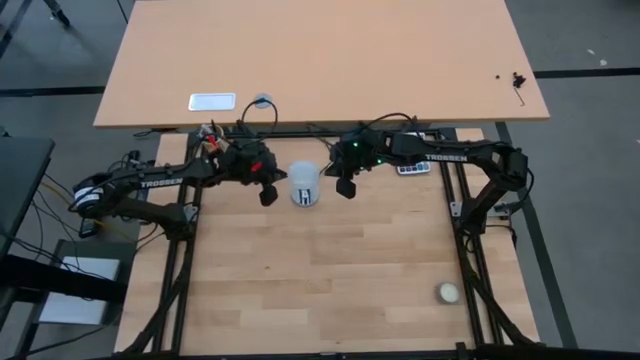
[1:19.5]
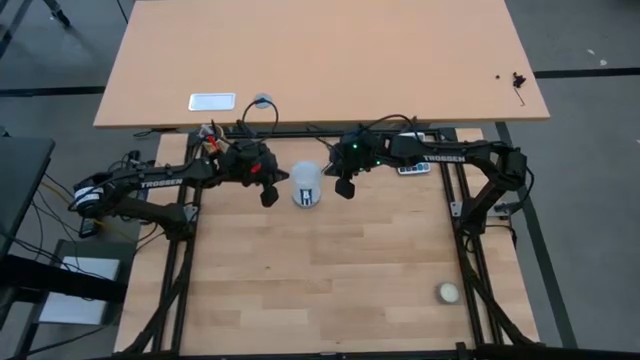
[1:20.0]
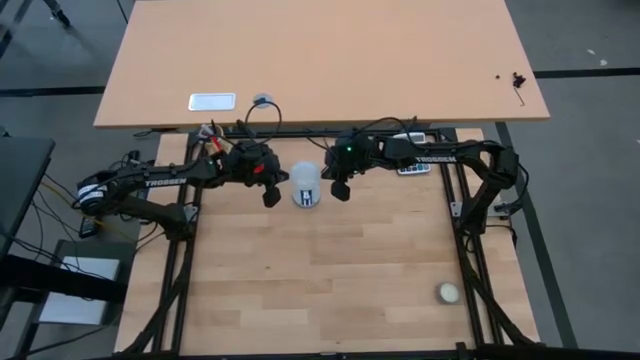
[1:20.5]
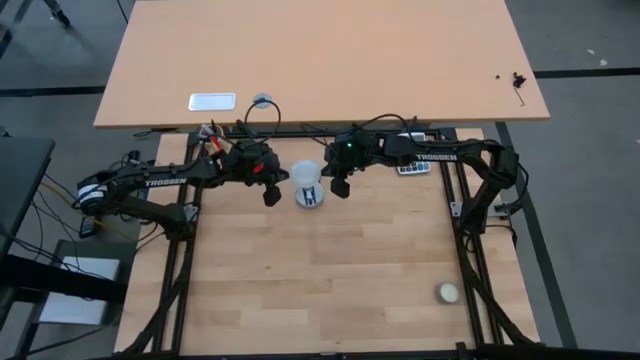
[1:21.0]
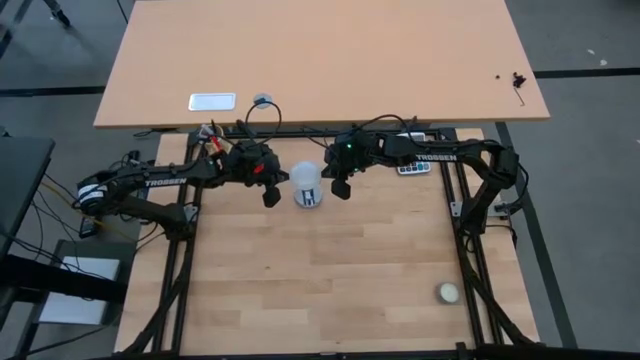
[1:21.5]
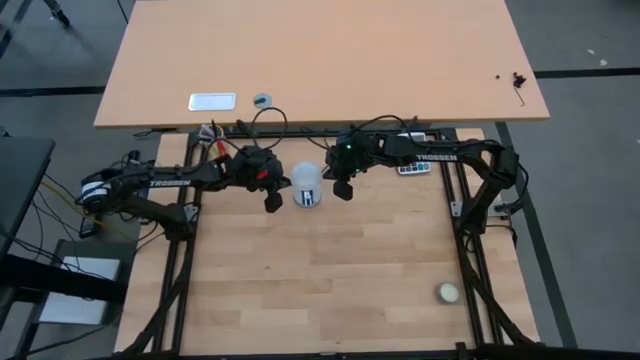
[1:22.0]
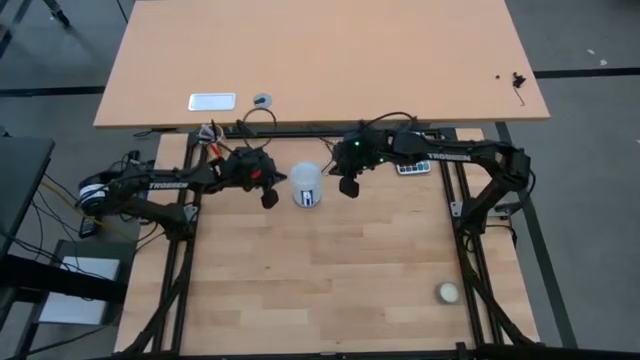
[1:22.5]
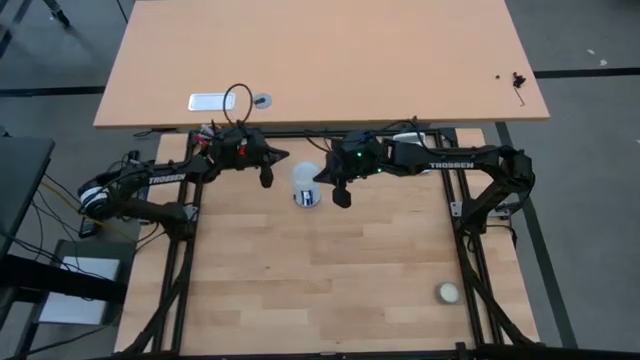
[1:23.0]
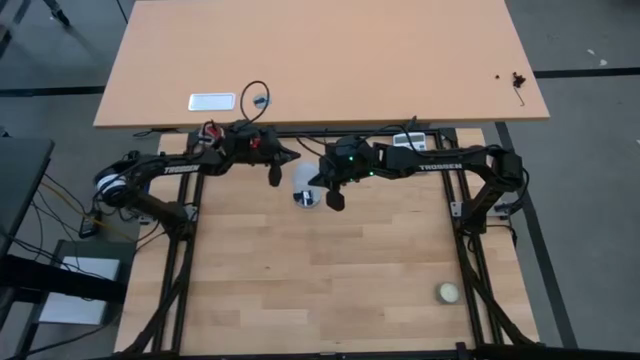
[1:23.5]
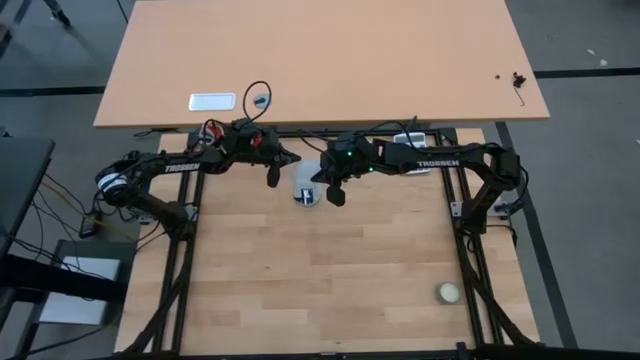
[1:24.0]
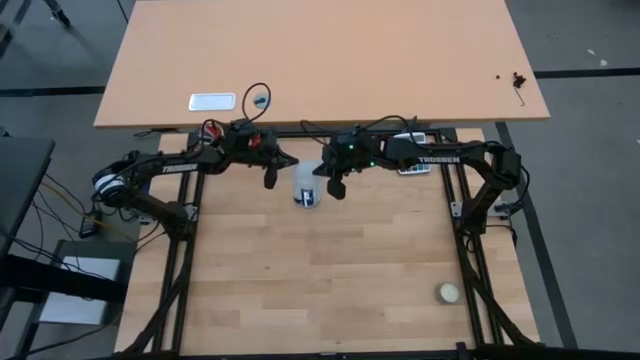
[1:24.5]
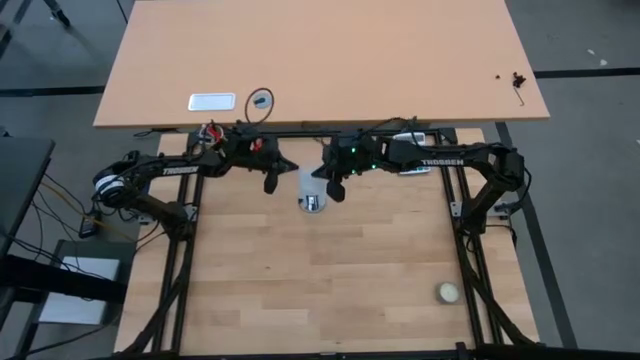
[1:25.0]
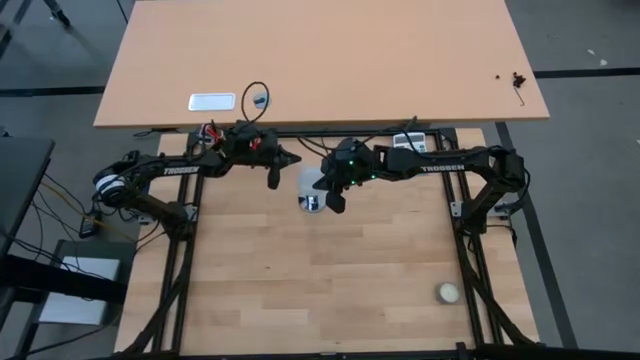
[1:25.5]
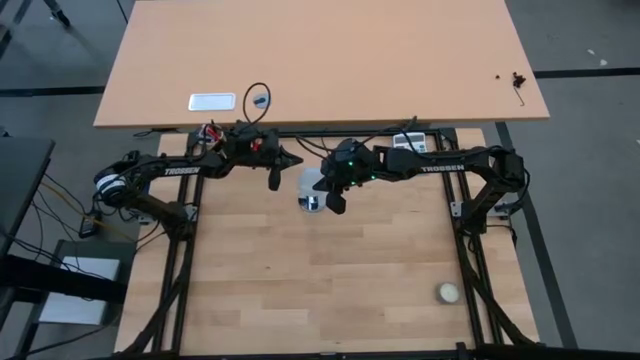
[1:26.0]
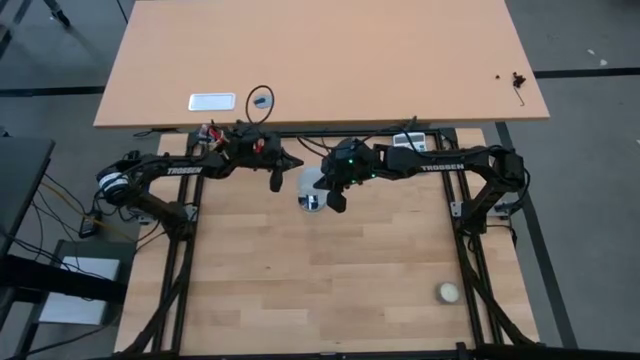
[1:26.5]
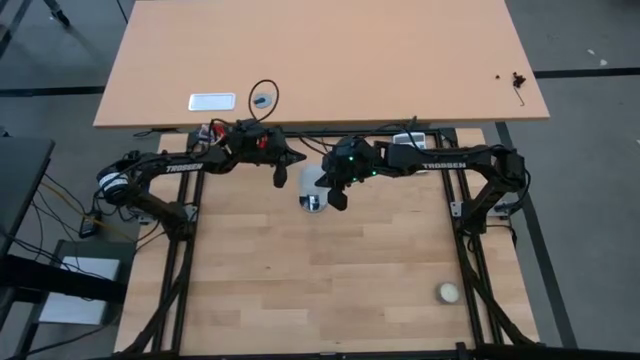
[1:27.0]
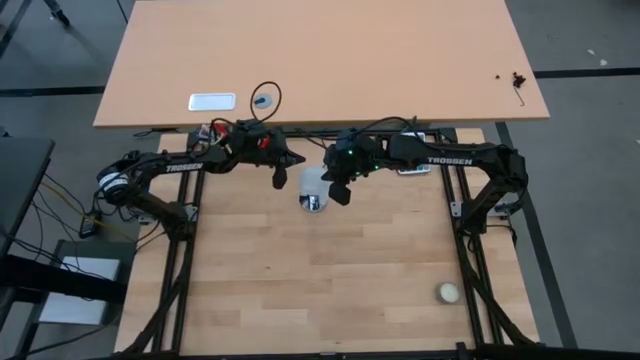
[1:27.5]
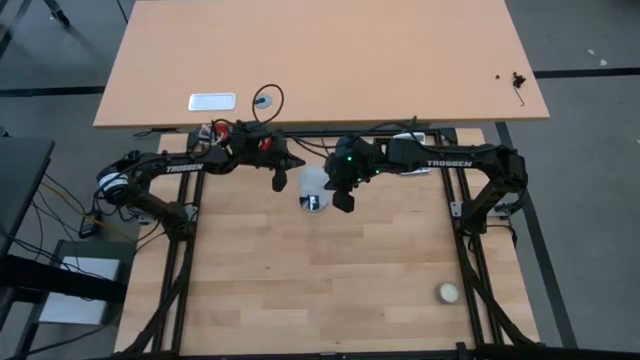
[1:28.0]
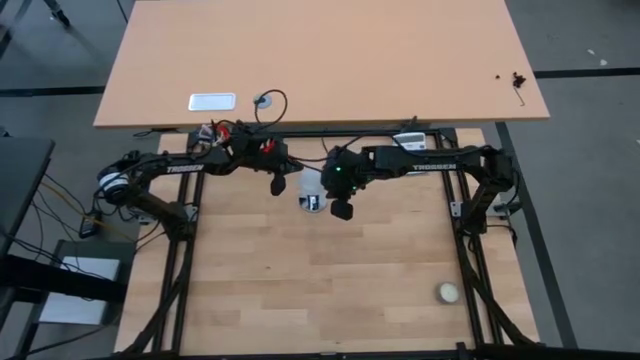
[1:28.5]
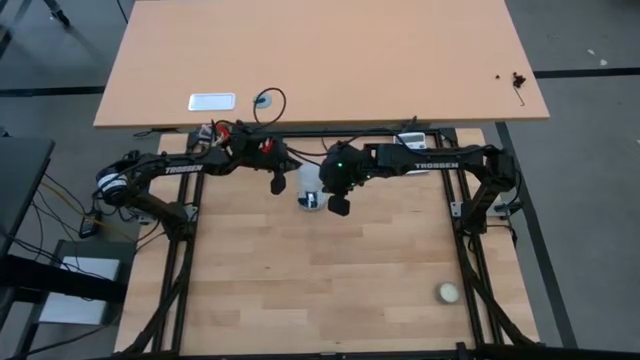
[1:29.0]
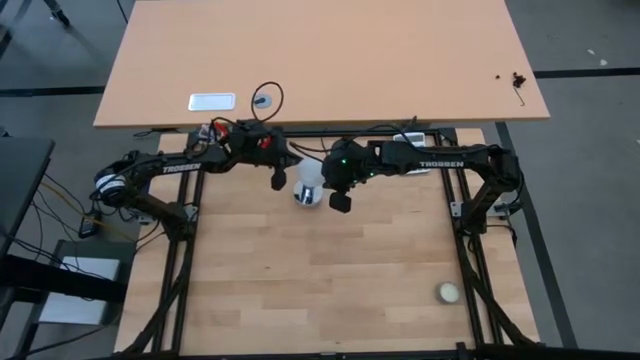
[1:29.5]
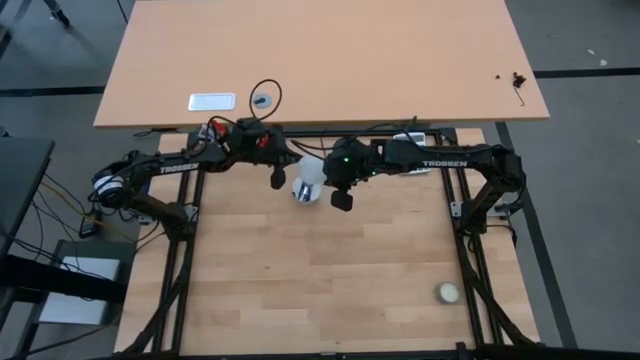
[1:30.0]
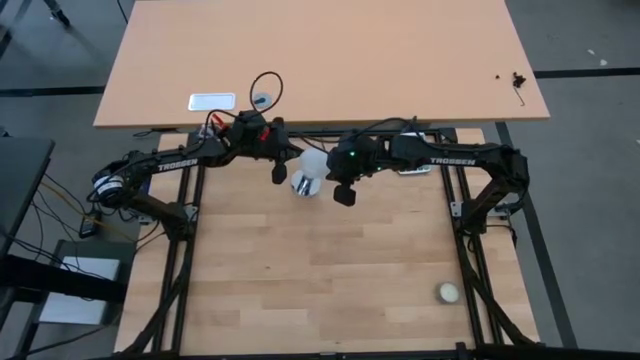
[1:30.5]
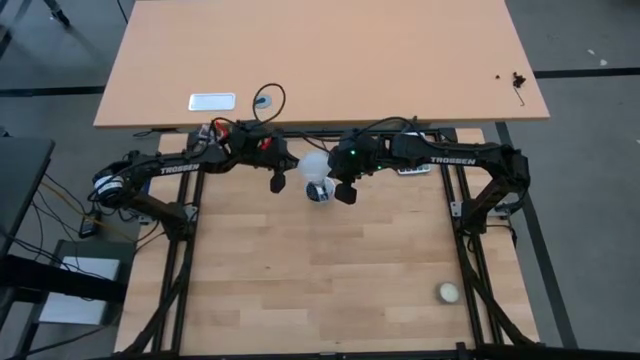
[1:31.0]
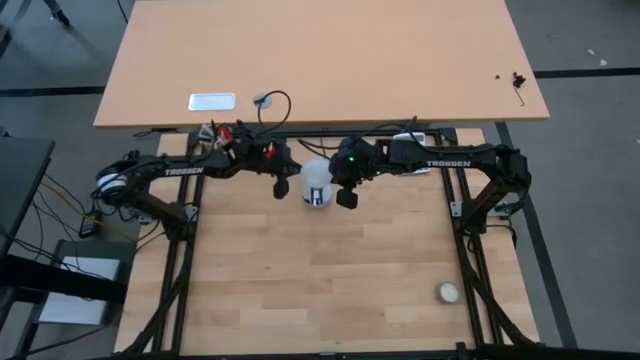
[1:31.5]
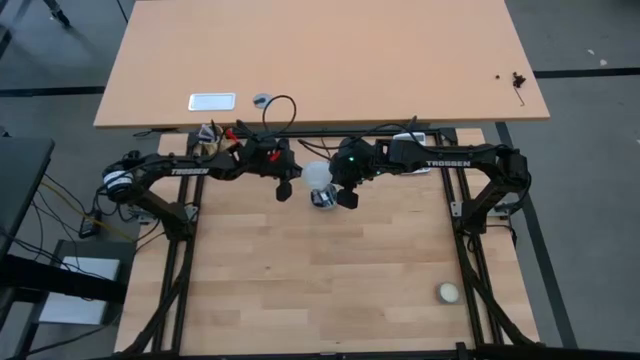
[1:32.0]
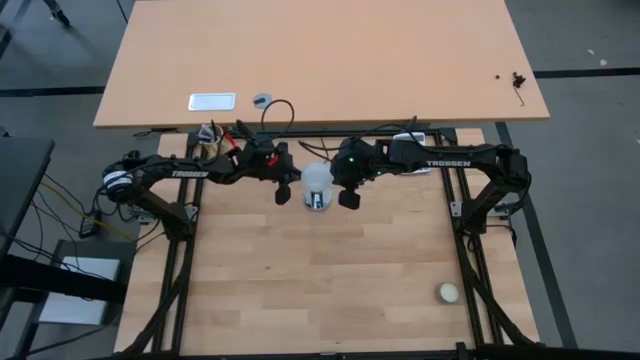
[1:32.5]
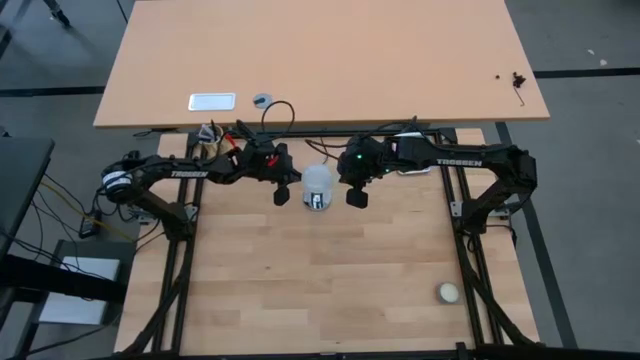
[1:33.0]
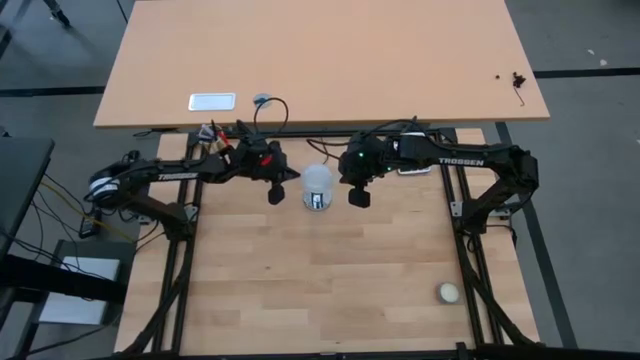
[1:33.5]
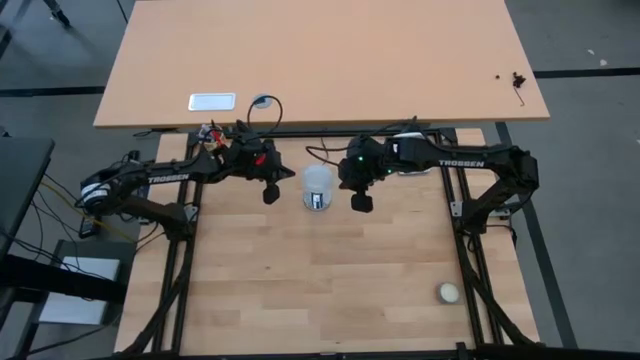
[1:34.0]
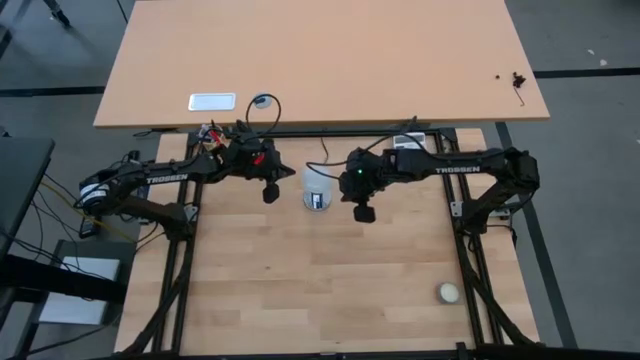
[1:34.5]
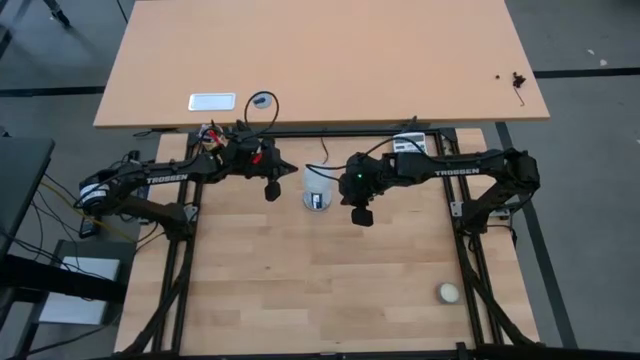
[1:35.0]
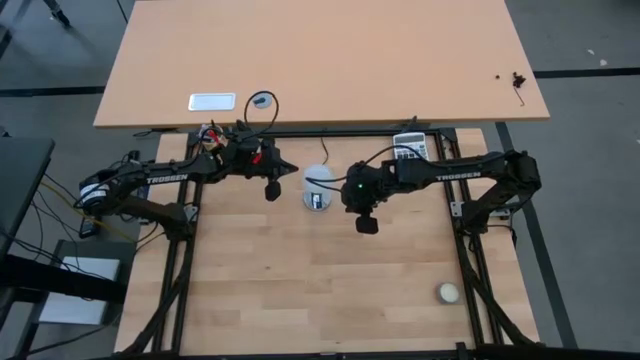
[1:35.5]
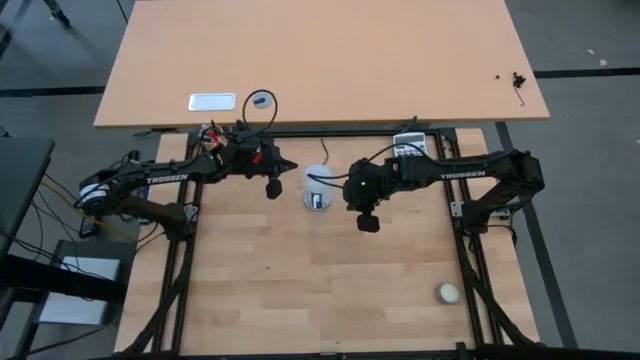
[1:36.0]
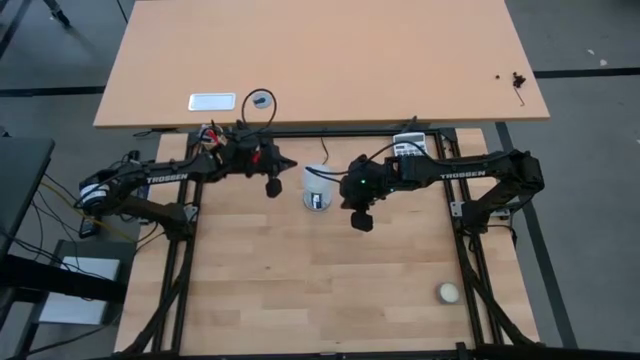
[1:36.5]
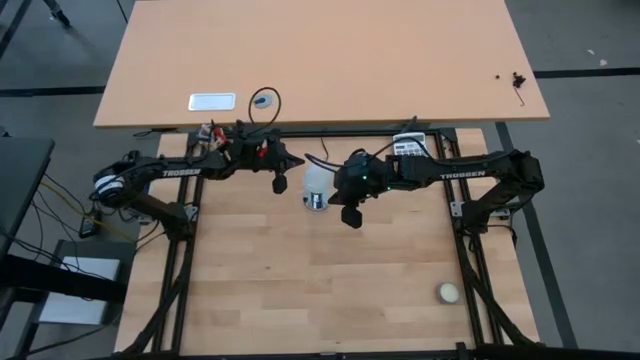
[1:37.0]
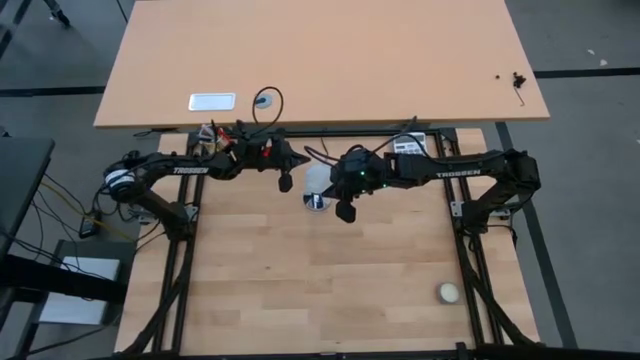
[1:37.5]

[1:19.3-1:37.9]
Task: Screw lightbulb
Remove the white lightbulb from the silver lamp

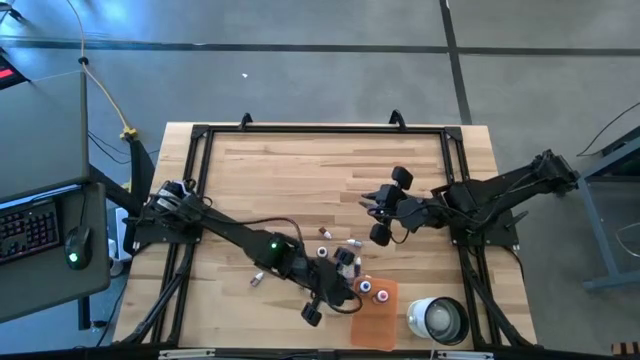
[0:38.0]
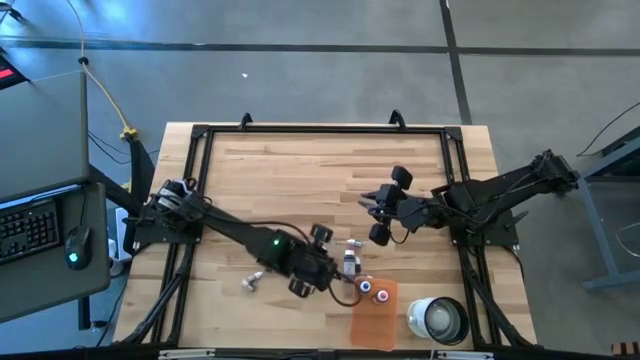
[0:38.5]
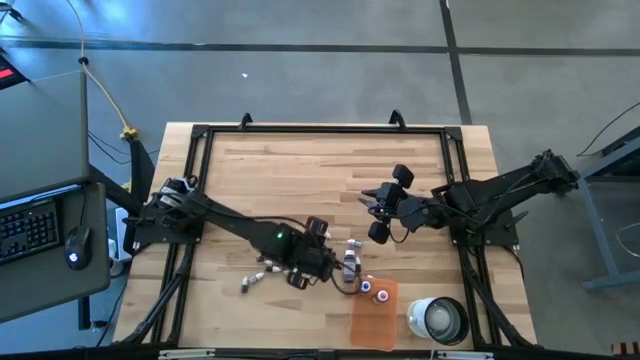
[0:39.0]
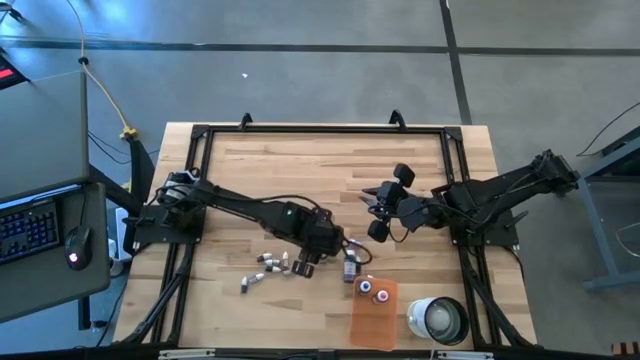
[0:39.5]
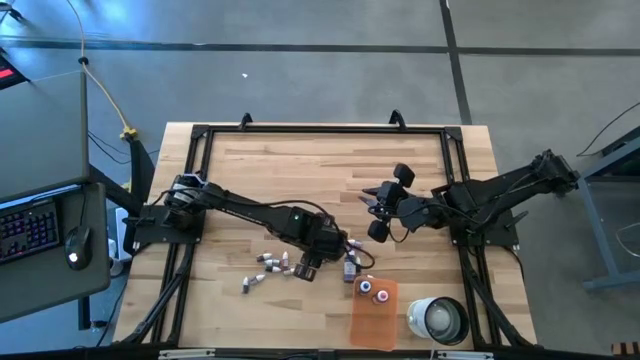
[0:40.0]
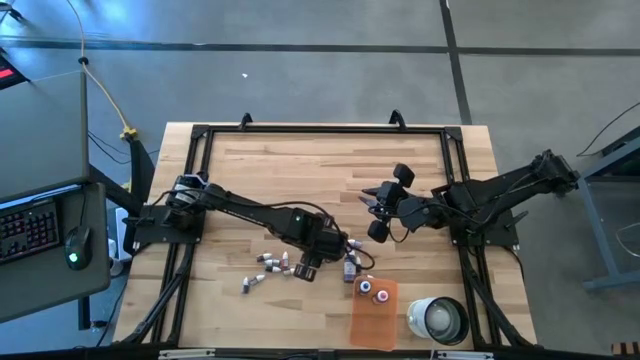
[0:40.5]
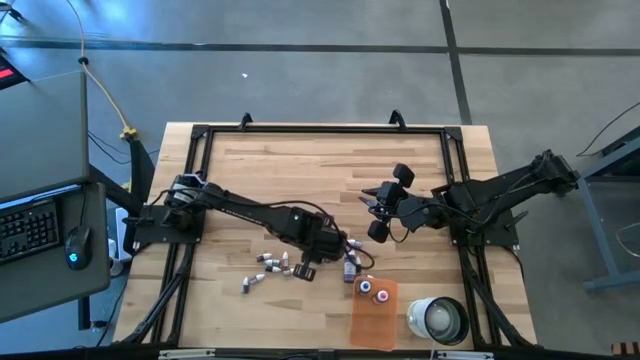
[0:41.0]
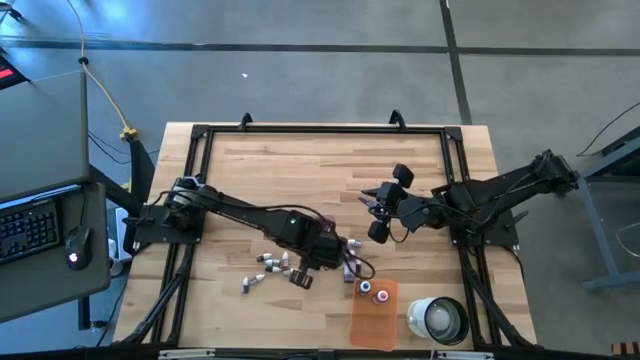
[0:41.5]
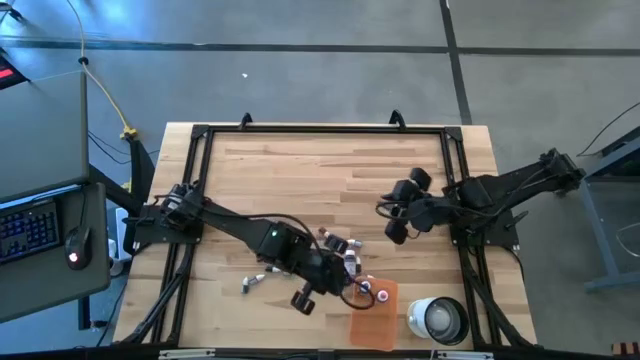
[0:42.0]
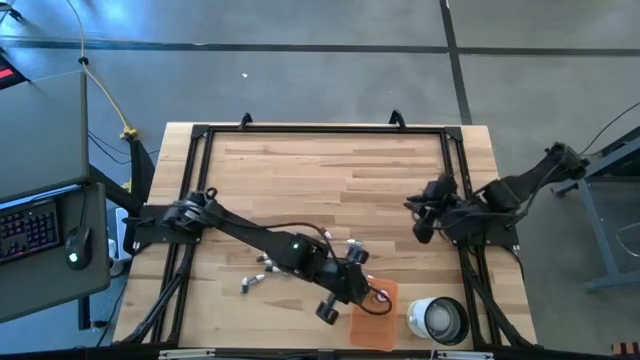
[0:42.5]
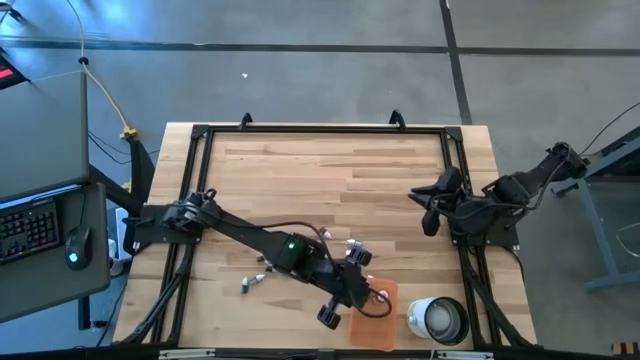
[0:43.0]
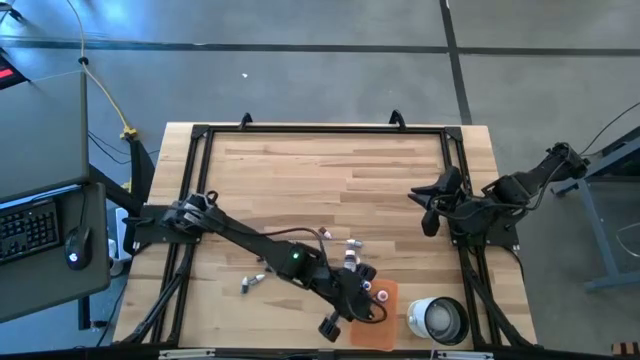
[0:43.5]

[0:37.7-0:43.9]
Task: Pick & Place food coloring
Put the large black food coloring bottle into the orange bin
